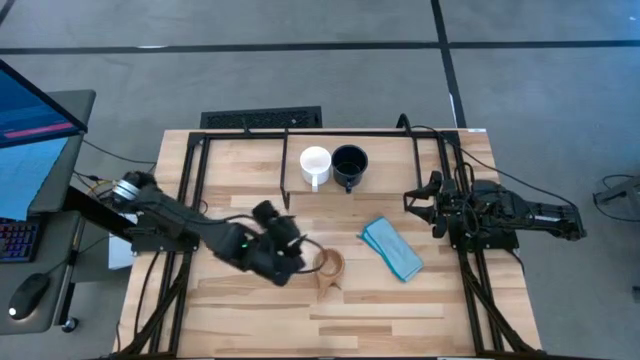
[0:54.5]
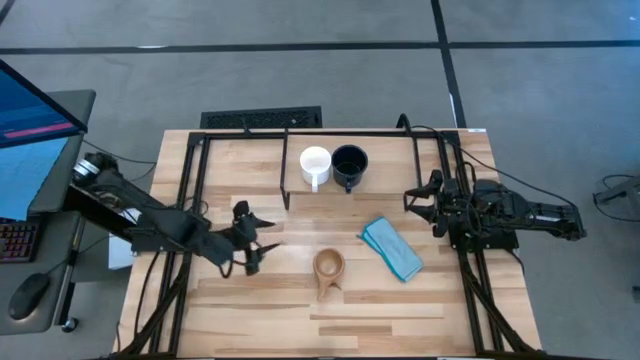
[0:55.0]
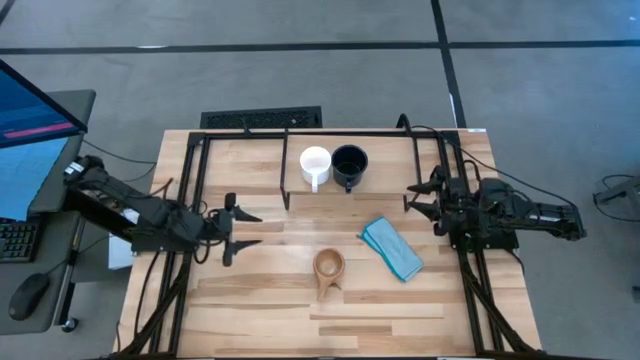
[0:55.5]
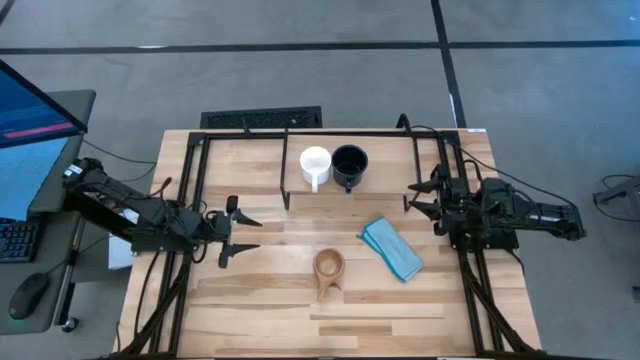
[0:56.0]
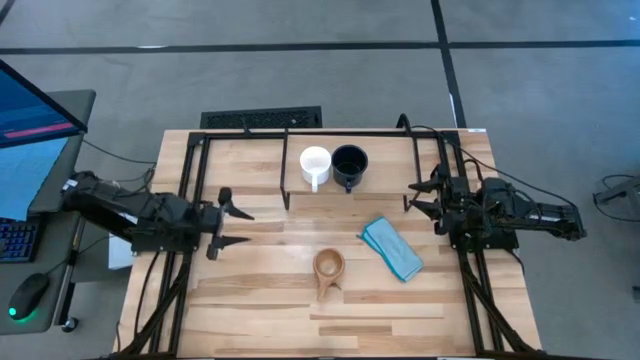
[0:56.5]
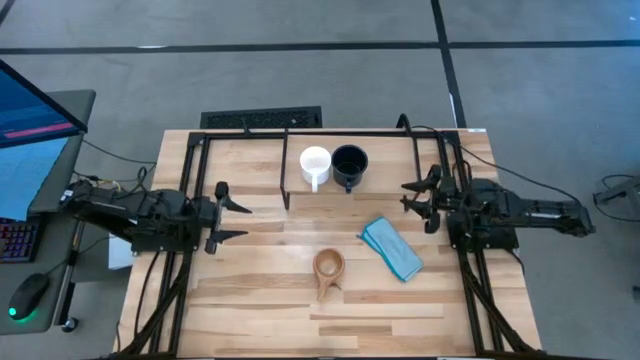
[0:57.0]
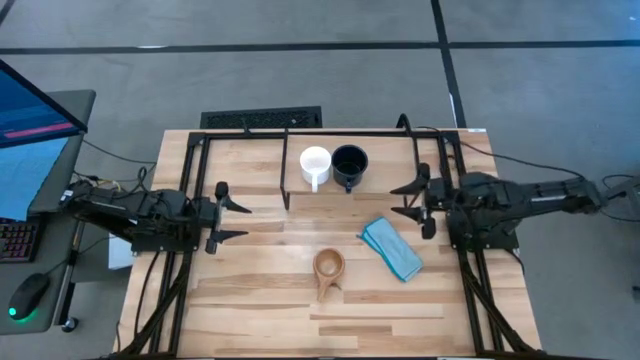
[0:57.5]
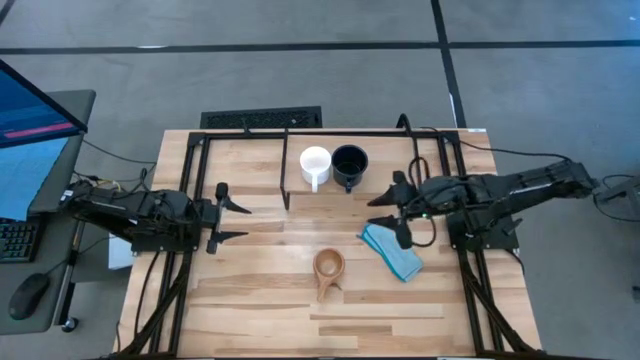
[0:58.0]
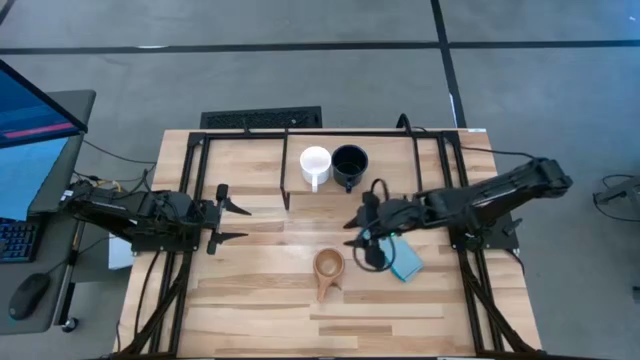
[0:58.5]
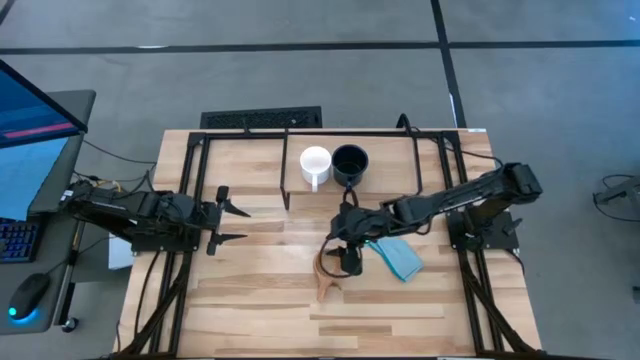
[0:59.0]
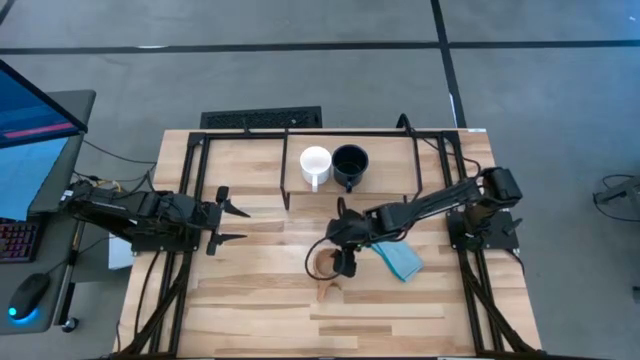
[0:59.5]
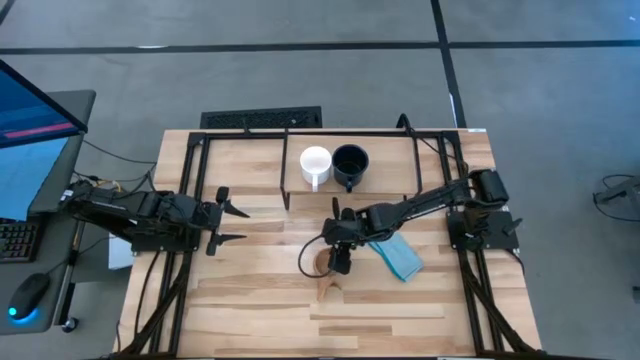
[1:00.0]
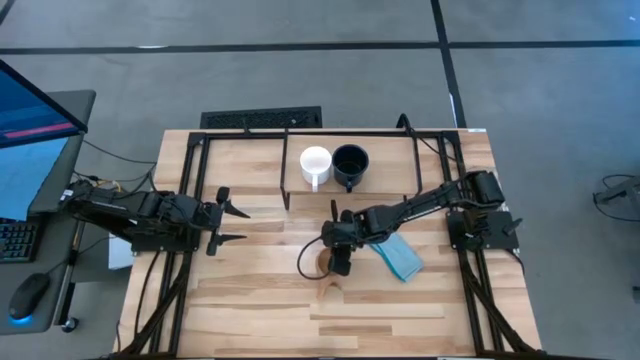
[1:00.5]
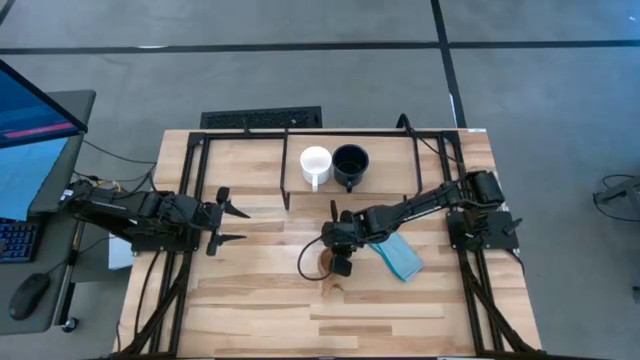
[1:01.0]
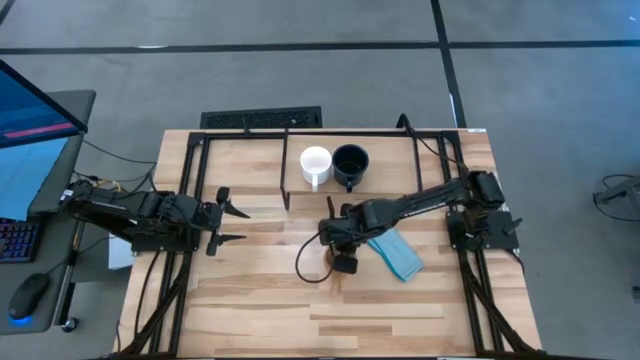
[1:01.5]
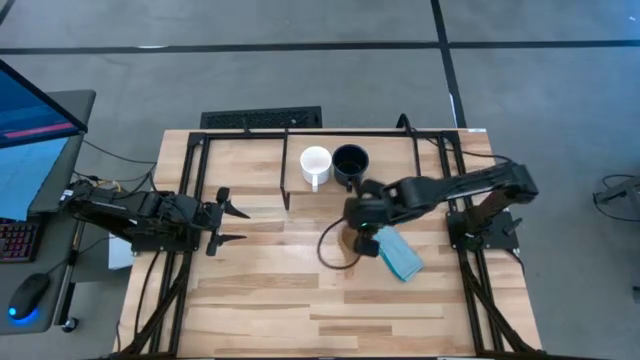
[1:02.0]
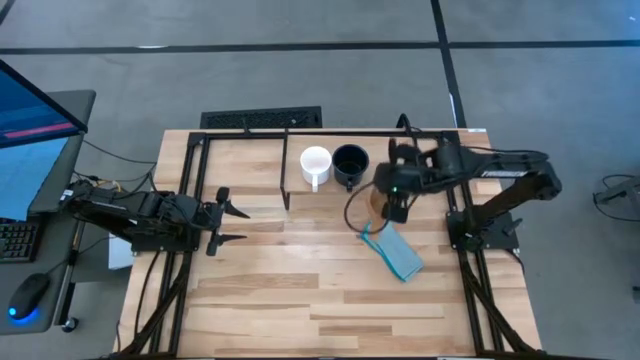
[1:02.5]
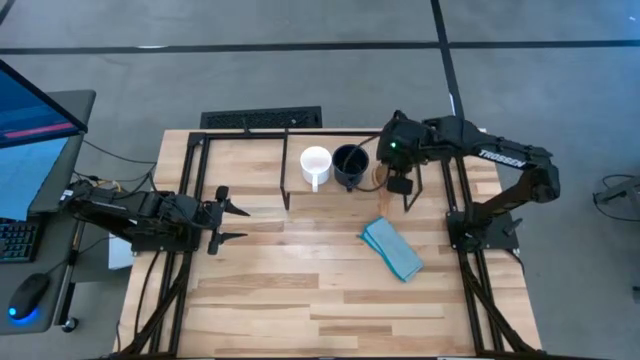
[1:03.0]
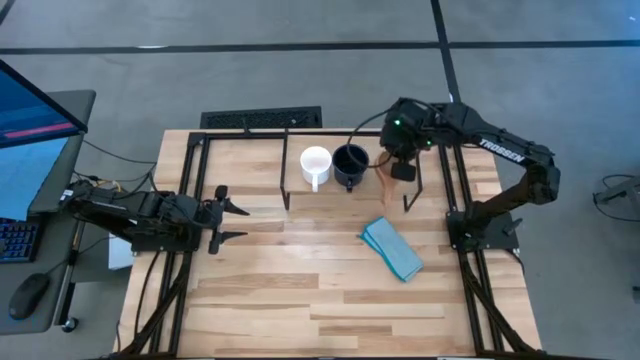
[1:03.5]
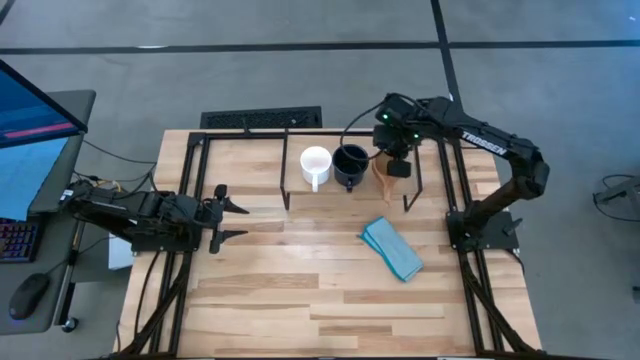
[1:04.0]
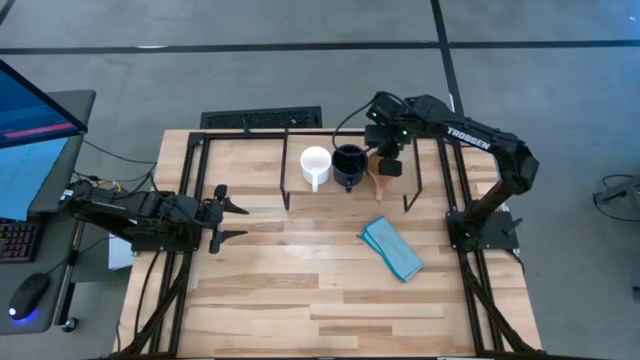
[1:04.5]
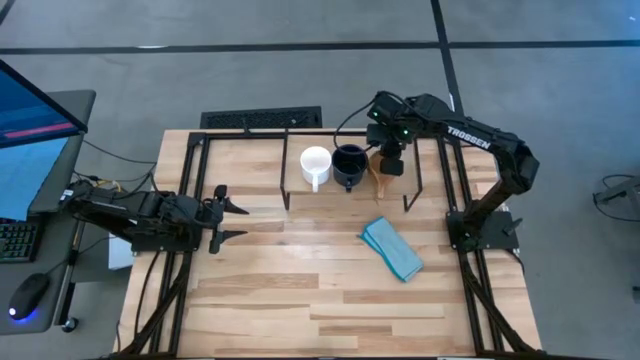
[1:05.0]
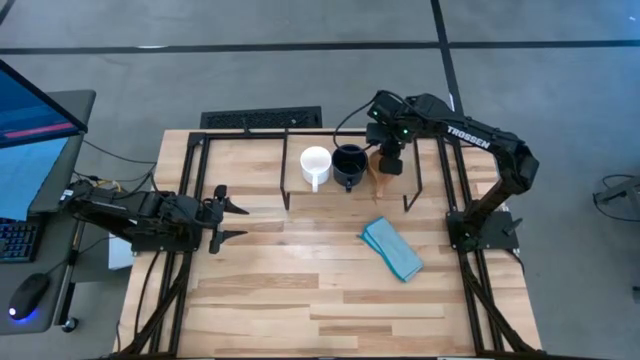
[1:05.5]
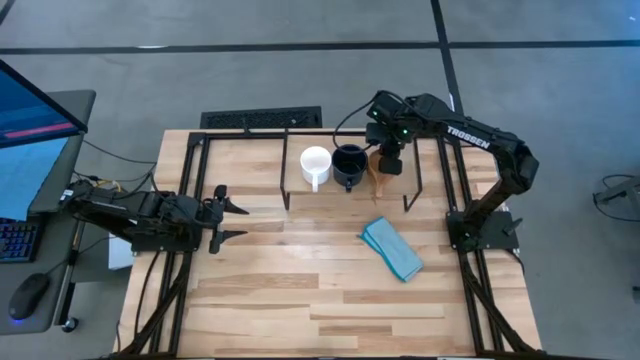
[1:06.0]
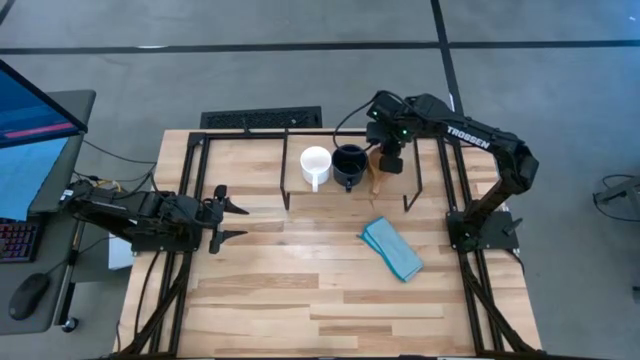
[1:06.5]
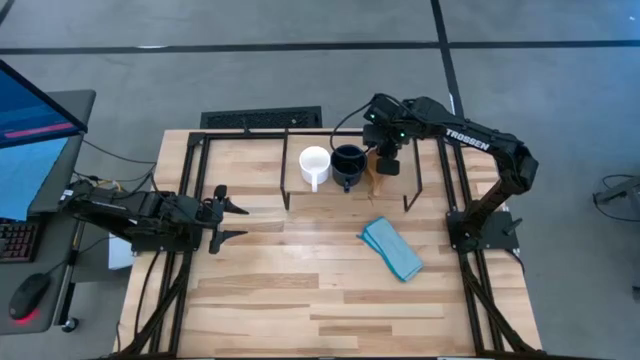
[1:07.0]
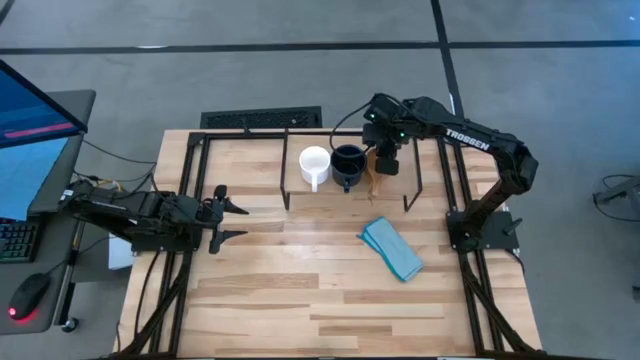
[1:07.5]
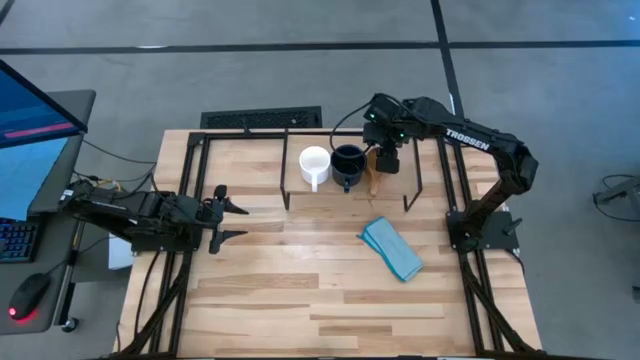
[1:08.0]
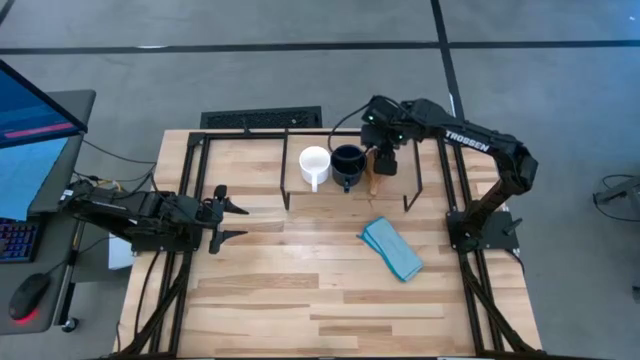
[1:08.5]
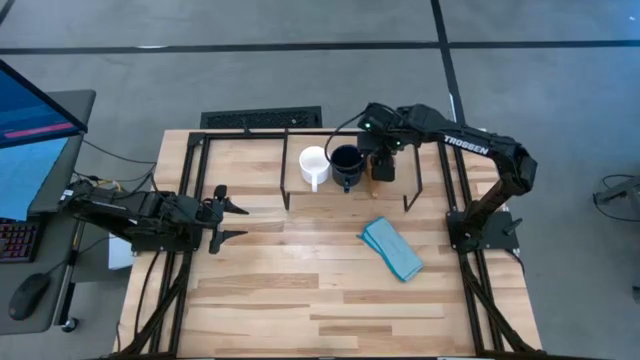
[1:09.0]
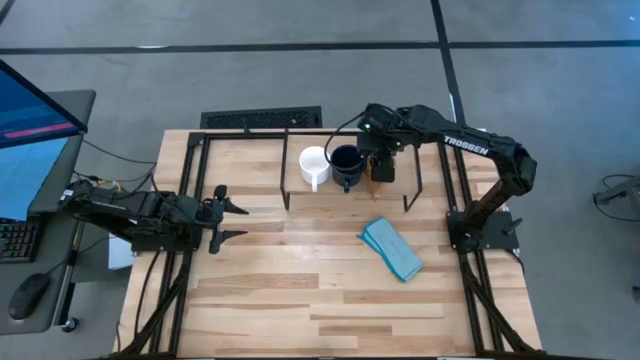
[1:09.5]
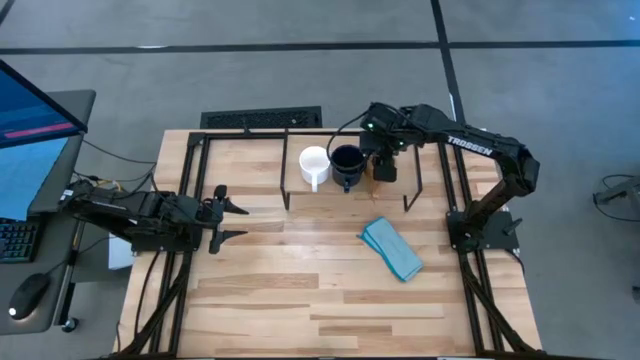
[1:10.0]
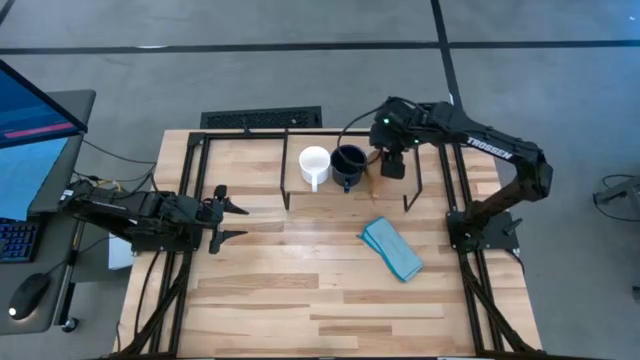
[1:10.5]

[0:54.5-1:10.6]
Task: Stack small to large cups/mugs on shelf
Put the brown wooden mug on the shelf

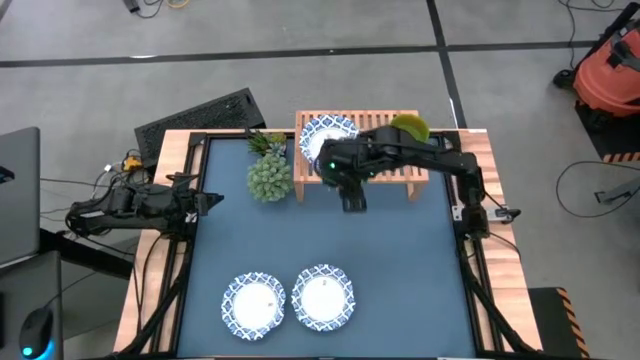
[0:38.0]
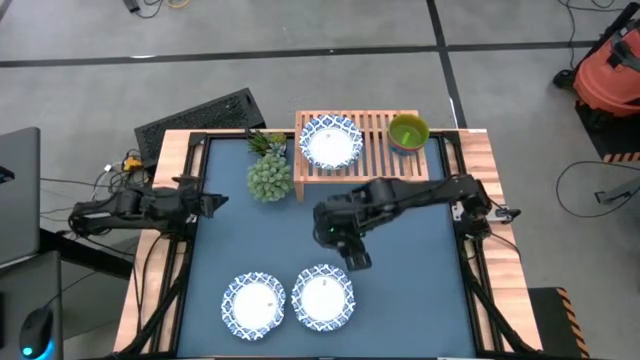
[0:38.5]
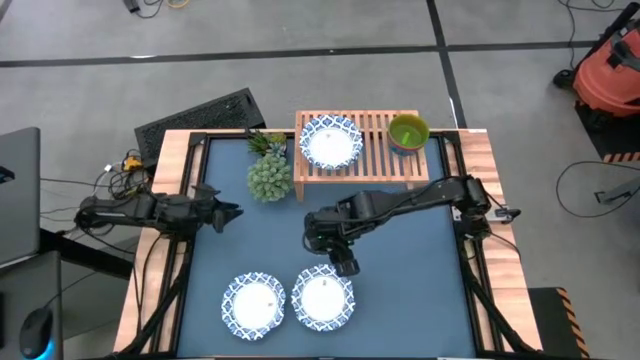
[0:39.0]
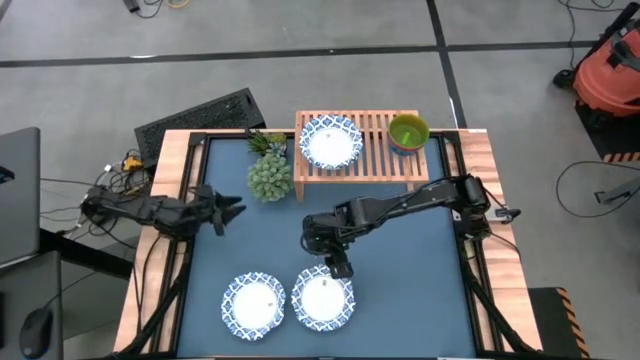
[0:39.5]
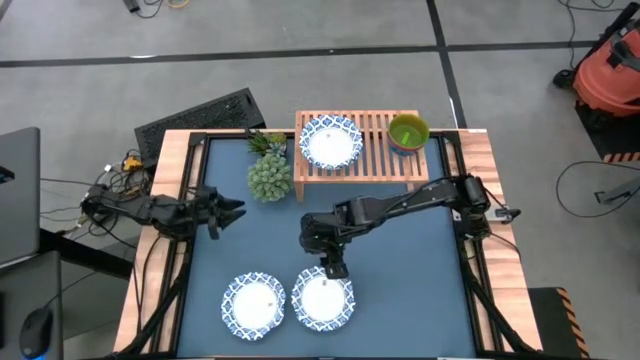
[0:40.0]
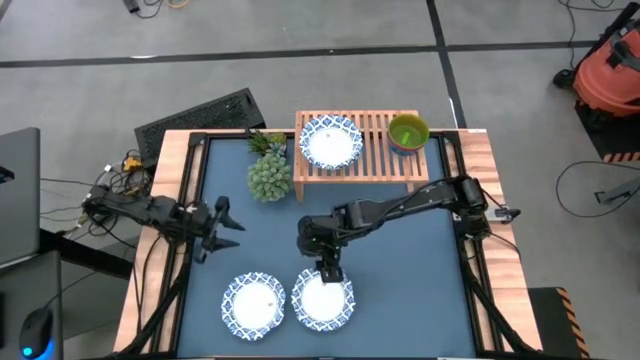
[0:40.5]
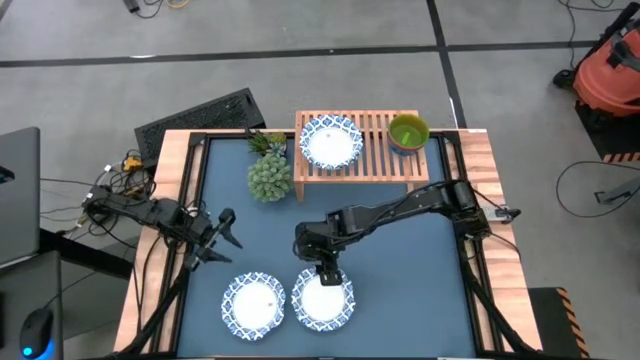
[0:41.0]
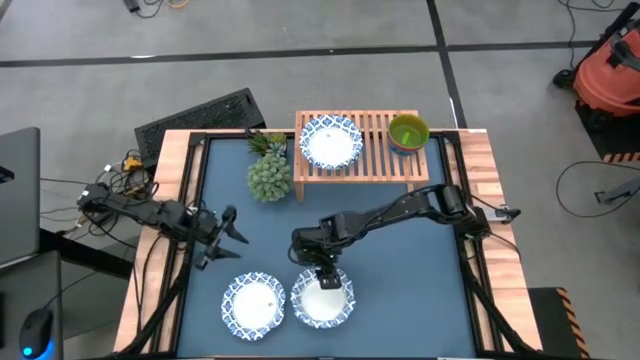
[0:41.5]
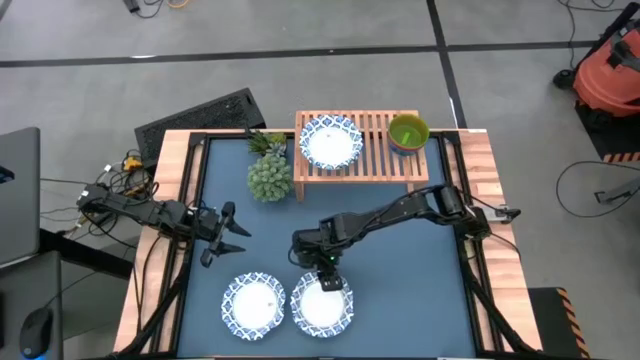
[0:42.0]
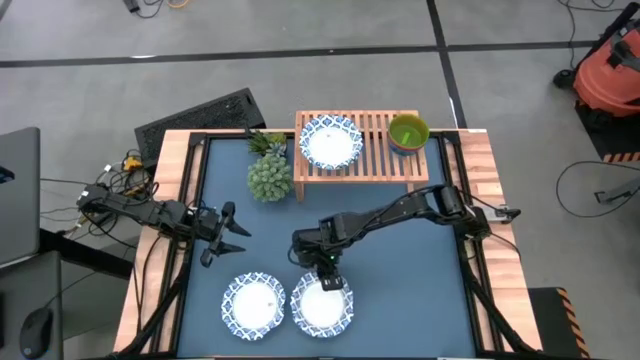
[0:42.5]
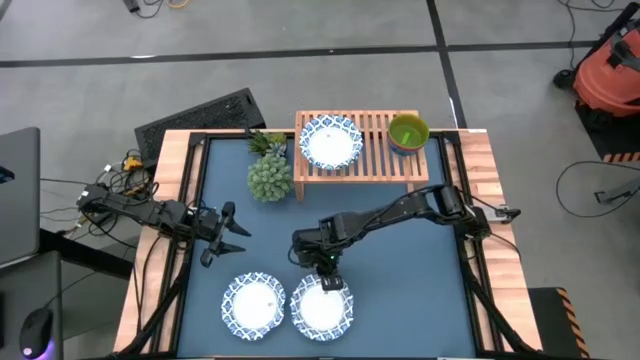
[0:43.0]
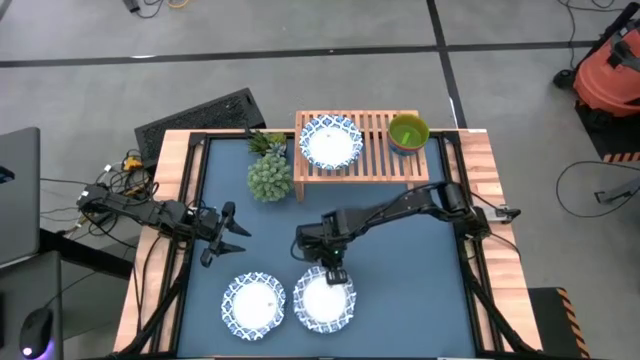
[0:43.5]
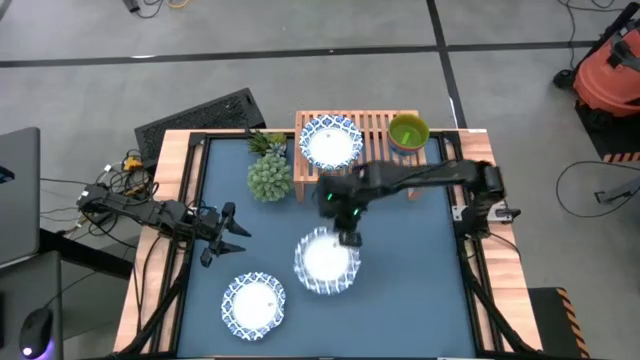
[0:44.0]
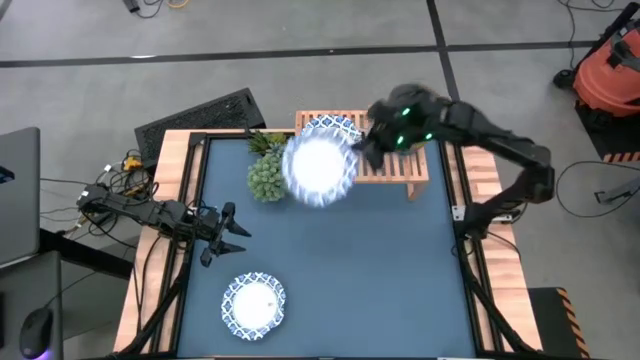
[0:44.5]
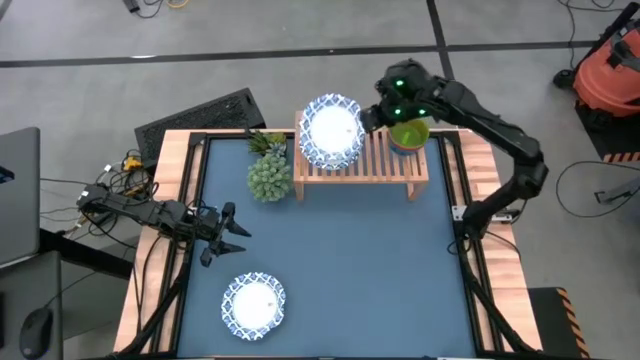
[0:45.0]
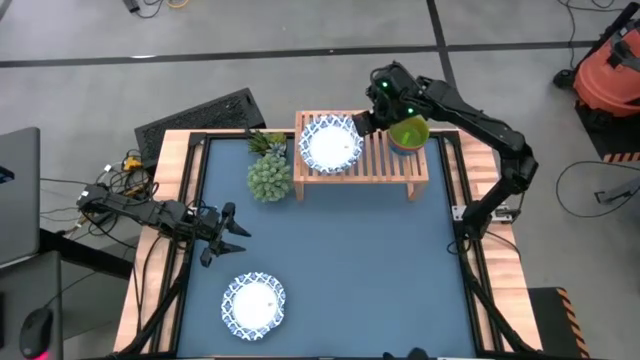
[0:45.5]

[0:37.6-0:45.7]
Task: Place and stack bowls onto a shelf
Stack the white bowl on top of the white bowl on the shelf
